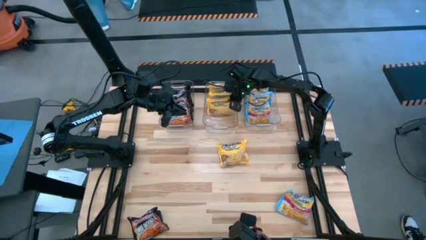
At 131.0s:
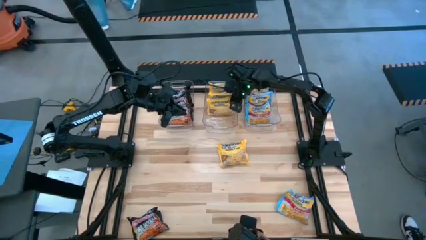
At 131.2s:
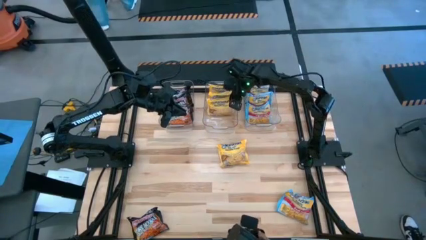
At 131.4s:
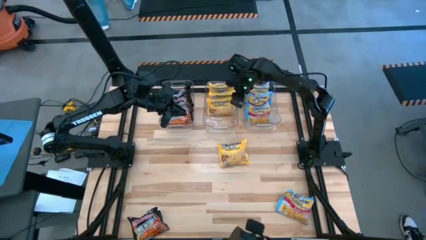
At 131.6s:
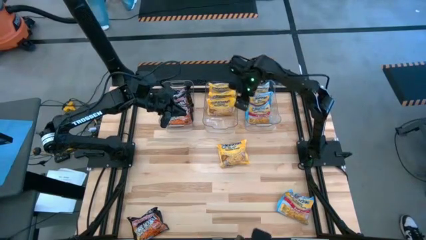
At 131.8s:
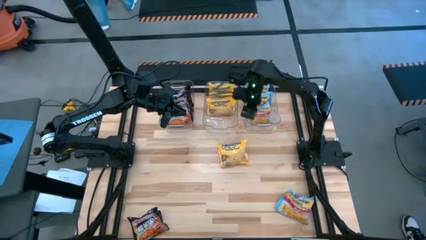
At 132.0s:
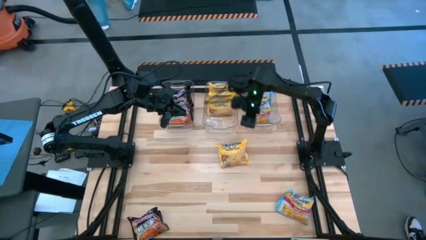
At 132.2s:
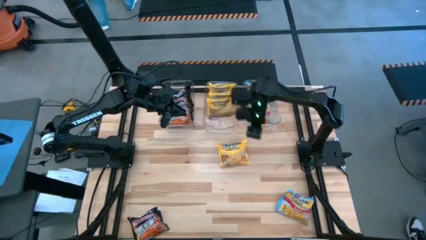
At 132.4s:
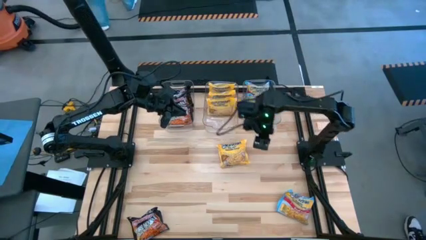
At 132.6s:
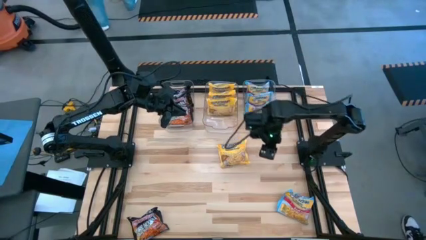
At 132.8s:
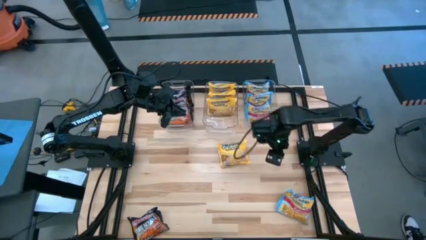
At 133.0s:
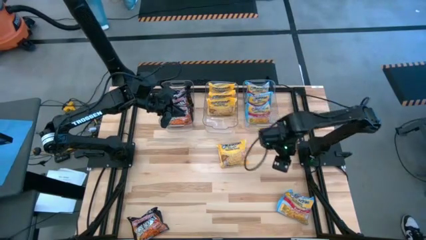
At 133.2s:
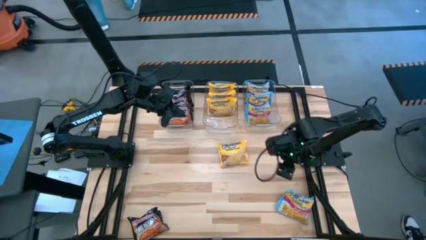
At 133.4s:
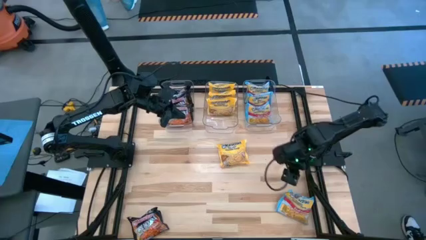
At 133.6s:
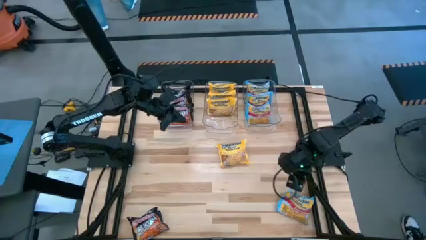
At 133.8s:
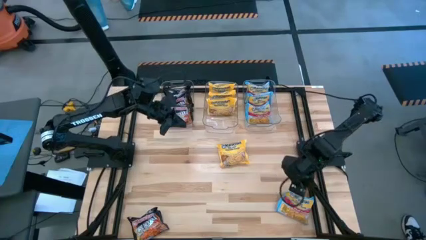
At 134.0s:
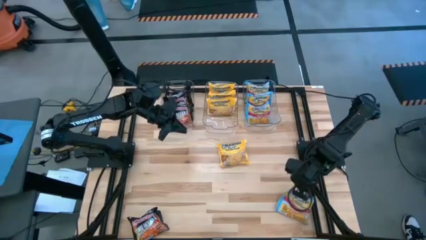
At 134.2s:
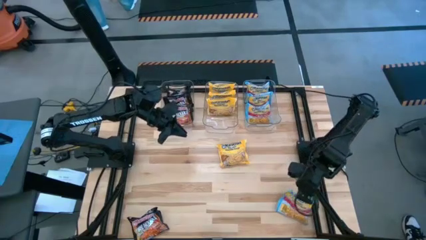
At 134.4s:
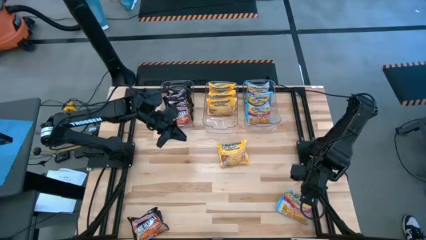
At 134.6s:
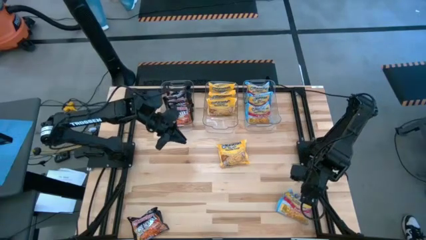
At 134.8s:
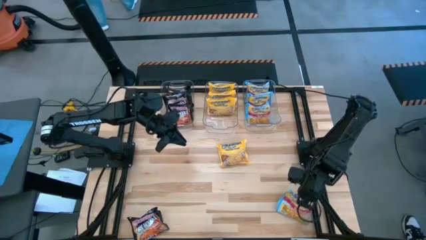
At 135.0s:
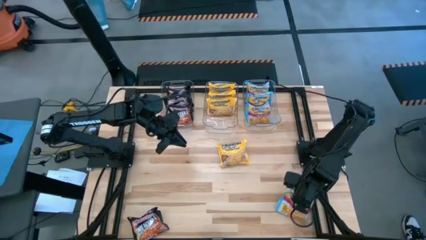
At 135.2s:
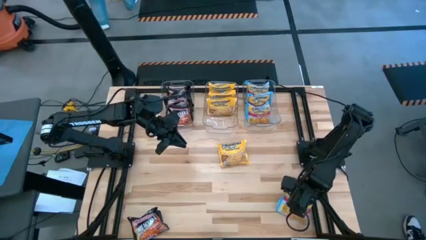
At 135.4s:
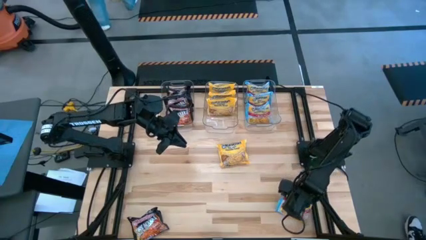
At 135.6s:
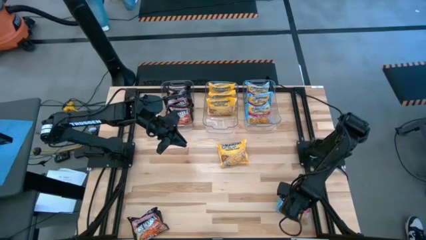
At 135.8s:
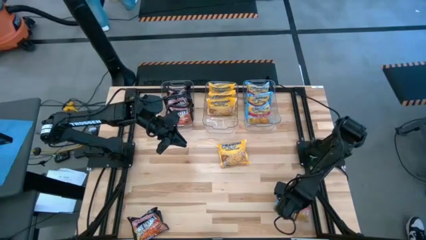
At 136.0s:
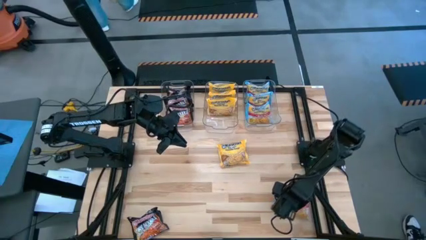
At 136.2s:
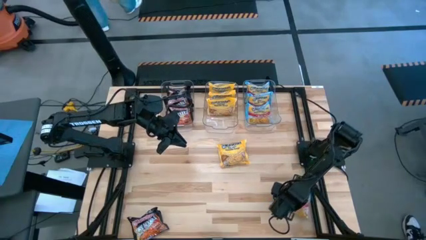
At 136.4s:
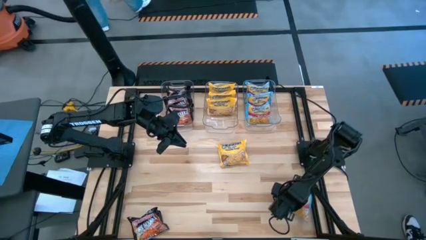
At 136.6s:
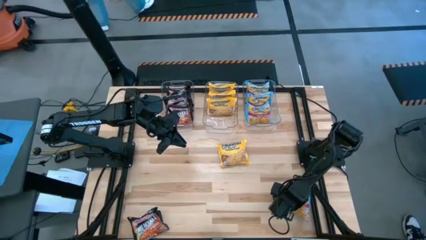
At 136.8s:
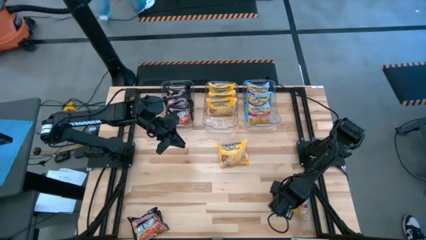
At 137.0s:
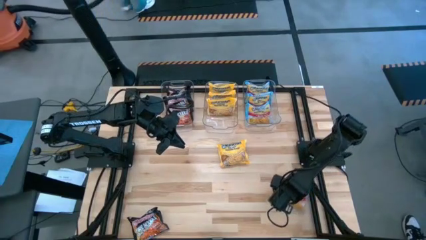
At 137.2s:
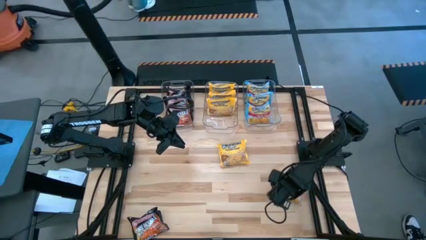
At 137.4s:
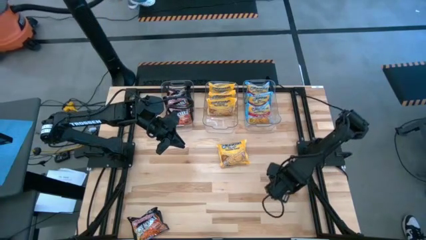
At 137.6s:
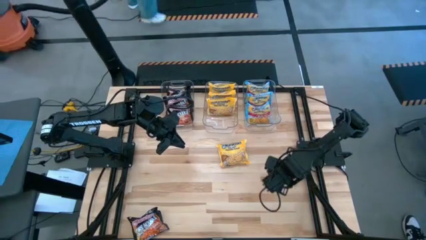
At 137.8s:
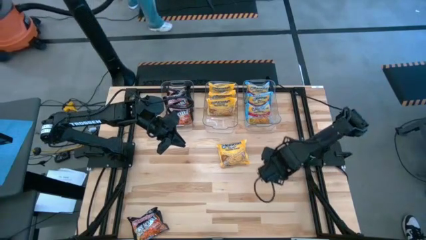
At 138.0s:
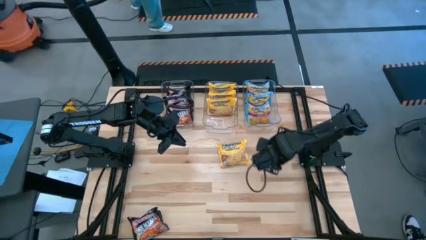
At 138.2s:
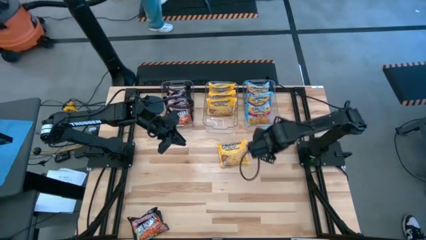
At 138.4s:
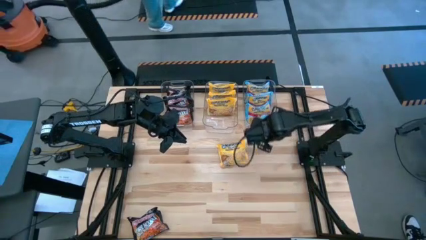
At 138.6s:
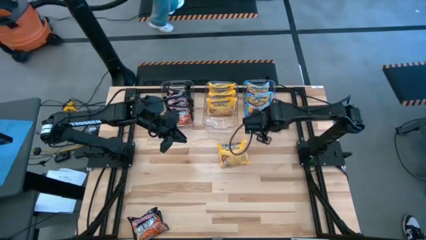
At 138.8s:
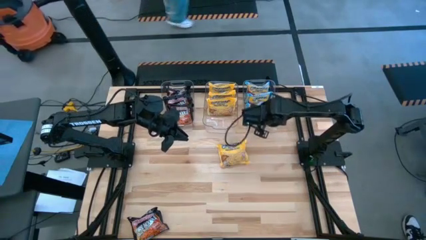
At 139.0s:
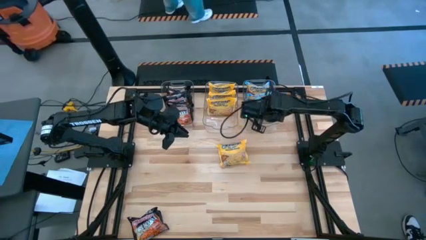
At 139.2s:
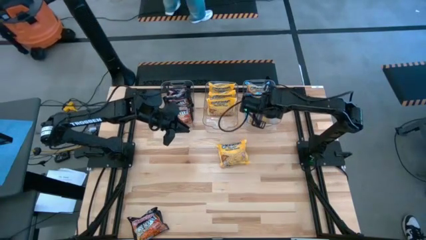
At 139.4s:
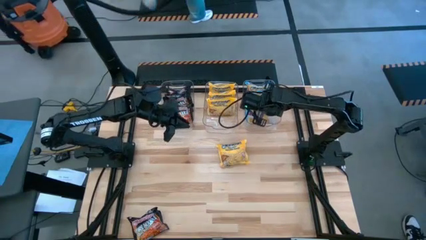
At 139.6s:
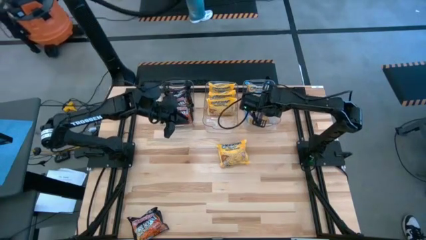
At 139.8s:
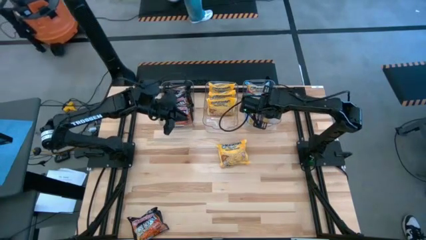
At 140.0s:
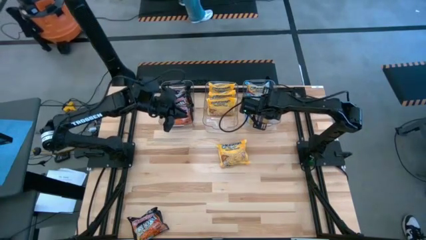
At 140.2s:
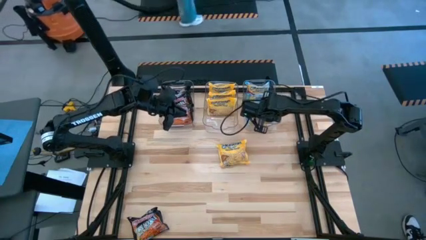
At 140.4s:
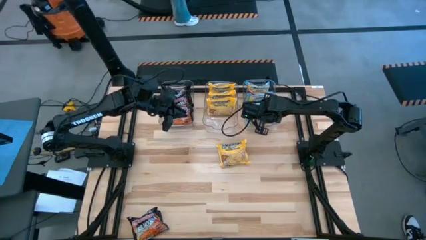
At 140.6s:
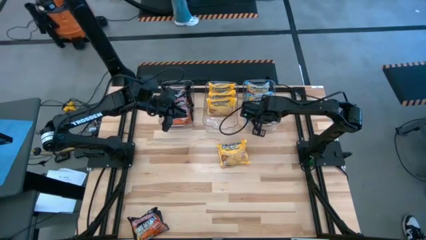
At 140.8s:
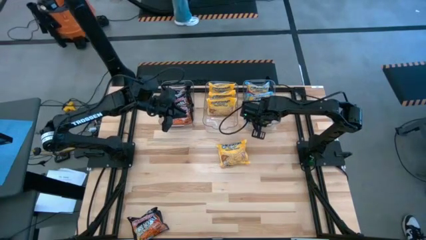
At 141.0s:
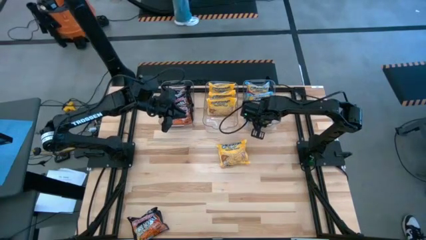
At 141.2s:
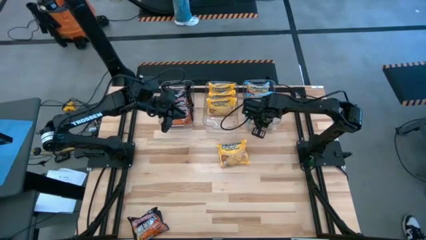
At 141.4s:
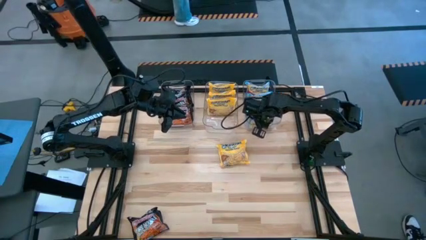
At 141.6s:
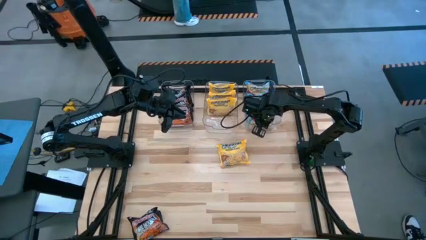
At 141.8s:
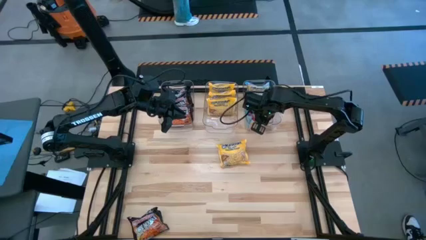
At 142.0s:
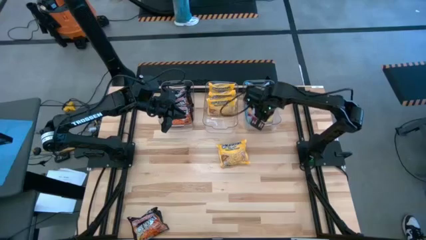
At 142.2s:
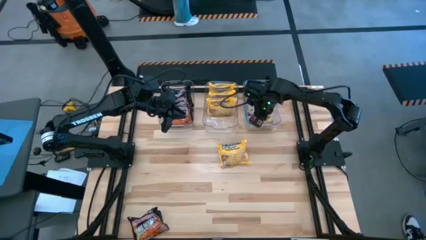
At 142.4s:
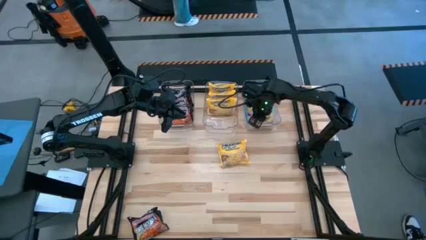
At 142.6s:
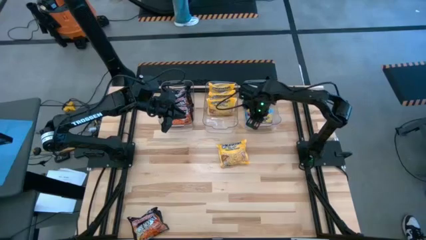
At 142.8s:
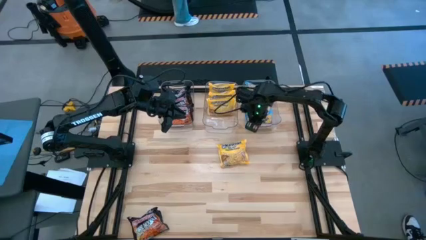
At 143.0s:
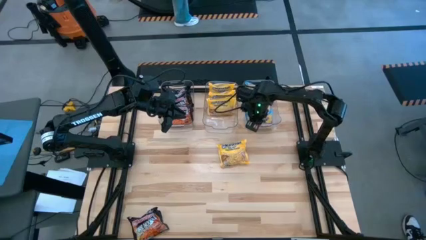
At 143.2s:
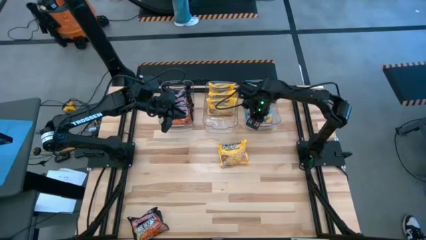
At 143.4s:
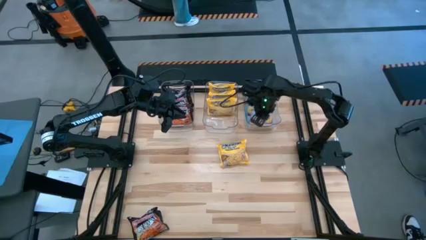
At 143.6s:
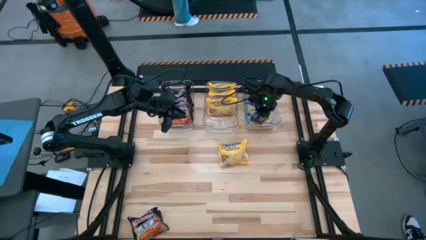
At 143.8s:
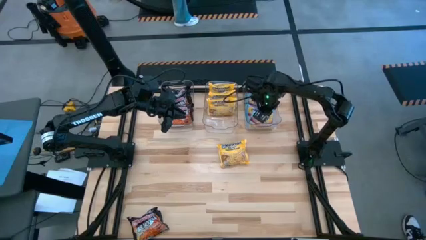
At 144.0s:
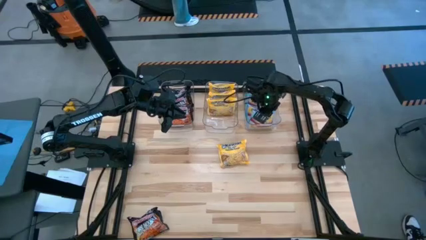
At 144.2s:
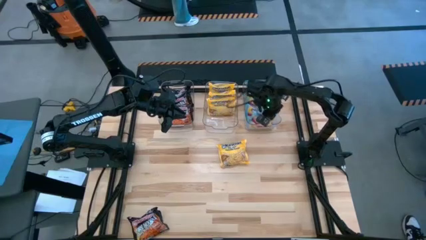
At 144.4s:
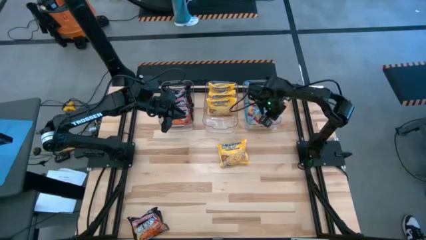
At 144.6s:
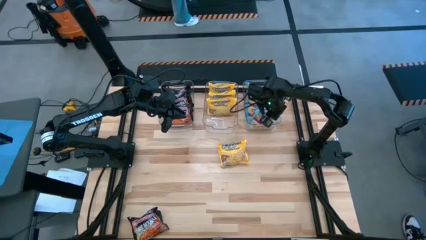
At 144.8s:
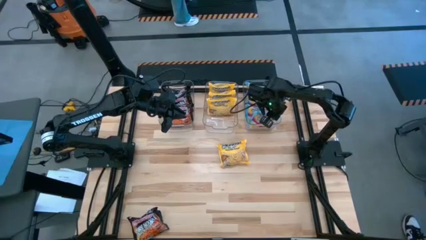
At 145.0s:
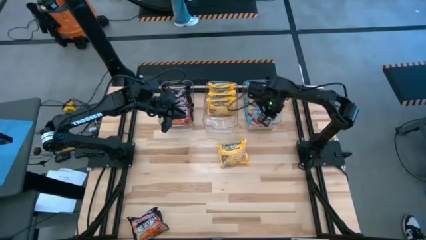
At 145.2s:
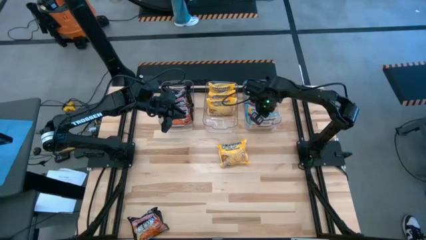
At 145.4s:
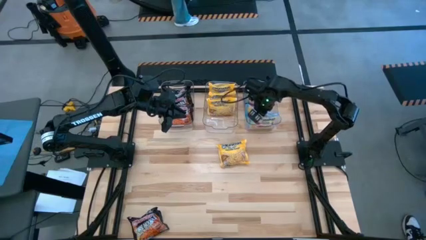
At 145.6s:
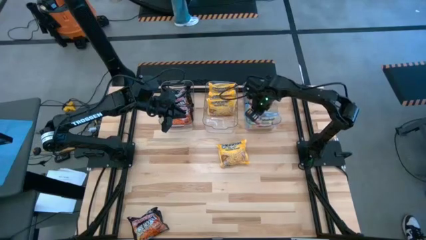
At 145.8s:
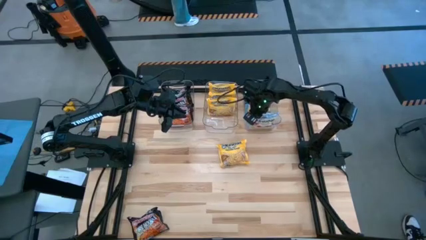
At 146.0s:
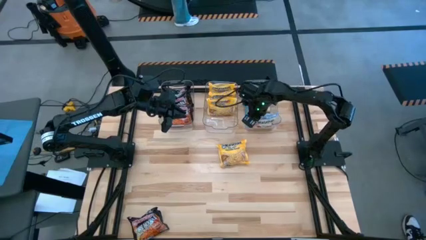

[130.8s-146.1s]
Task: Sort Maruchan noodles
Put the blue noodle pack into the right transparent bin

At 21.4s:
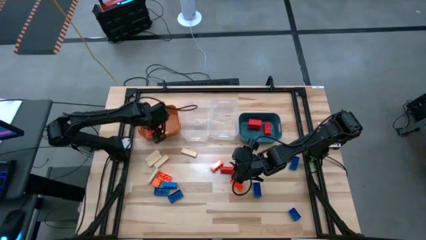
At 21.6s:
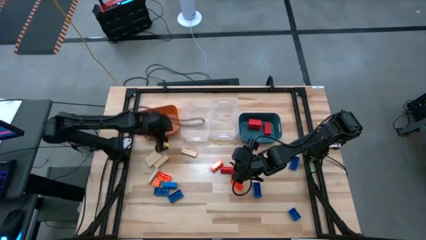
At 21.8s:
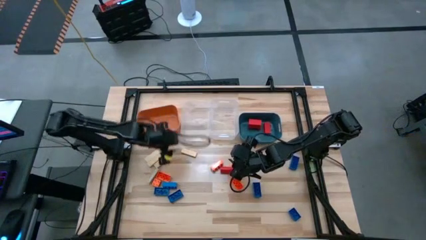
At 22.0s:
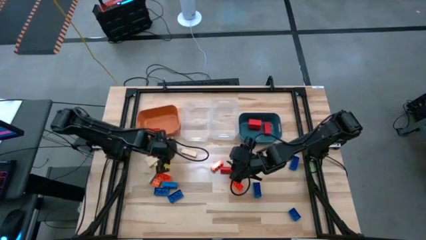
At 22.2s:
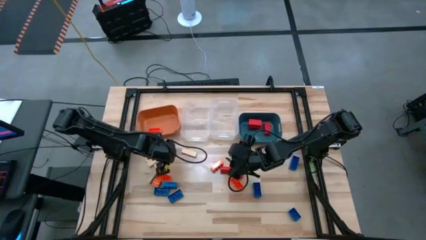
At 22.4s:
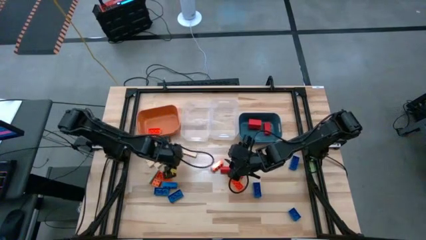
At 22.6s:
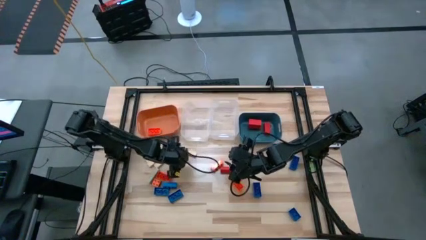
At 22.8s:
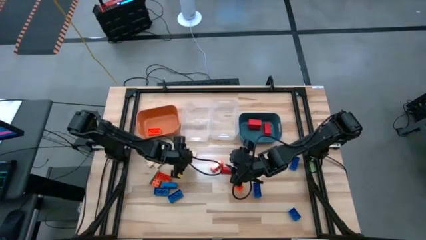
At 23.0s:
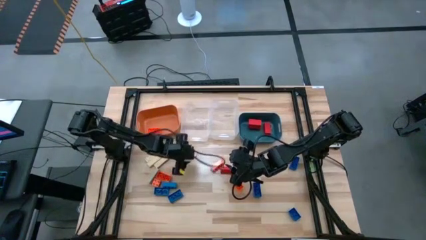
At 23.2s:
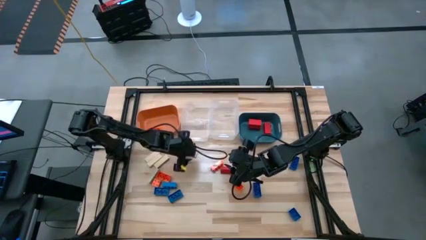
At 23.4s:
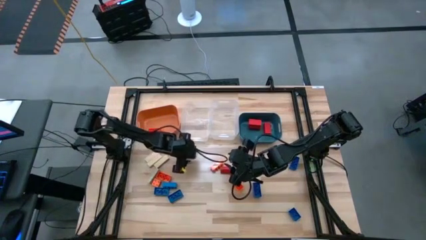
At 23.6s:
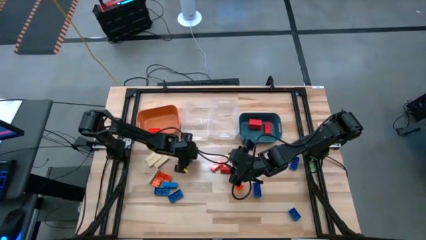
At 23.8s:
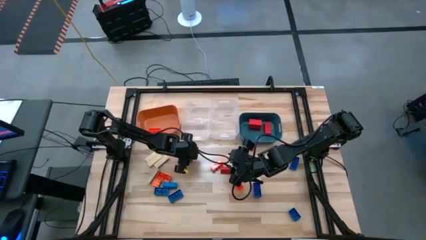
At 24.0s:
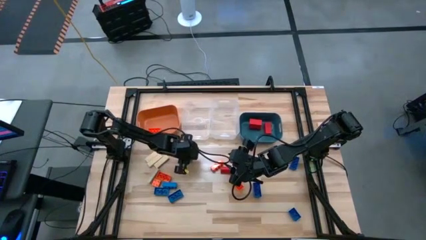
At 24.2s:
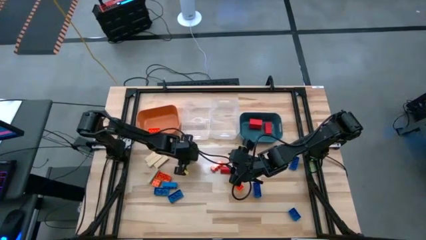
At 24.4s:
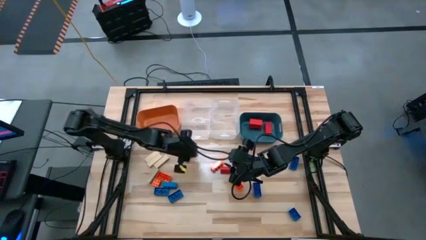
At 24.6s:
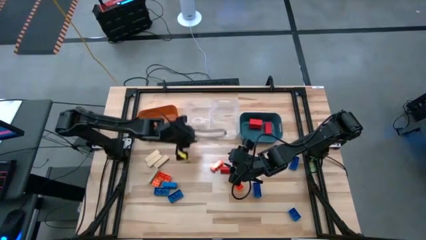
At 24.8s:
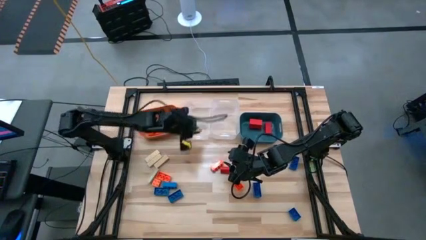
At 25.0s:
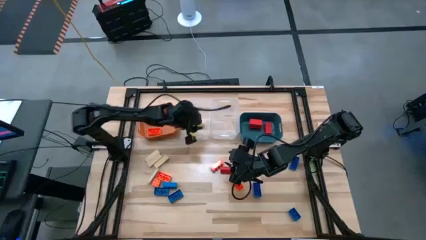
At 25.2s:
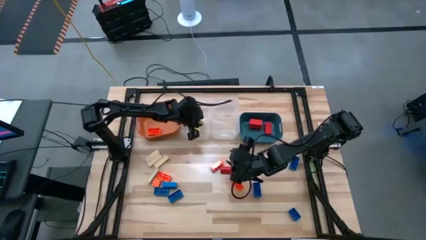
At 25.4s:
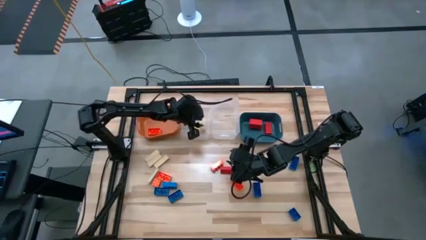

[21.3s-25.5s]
Task: Sort blocks
Put the brown block into the left transparent bin
